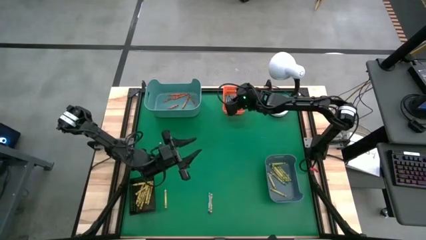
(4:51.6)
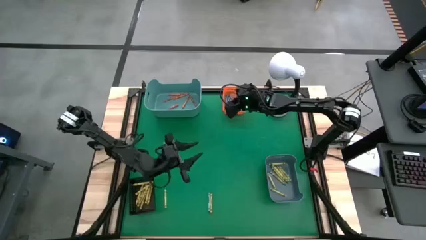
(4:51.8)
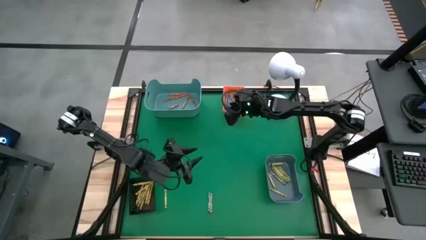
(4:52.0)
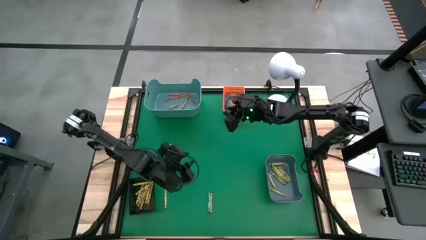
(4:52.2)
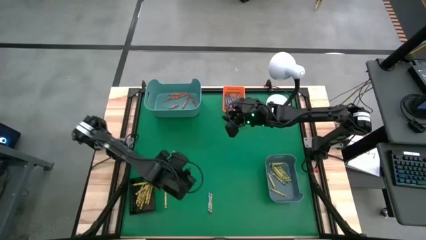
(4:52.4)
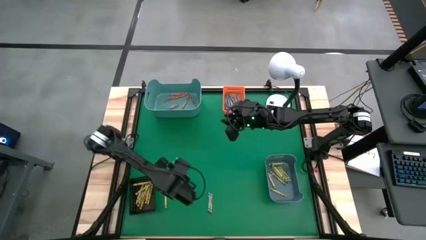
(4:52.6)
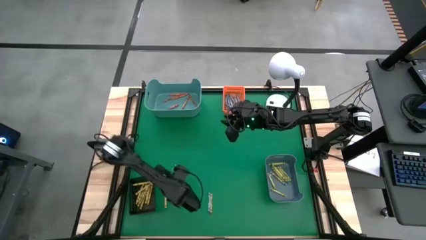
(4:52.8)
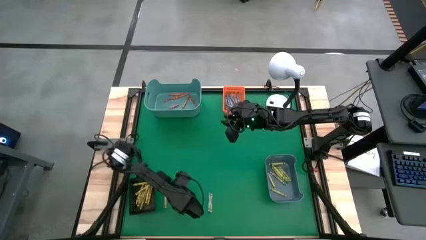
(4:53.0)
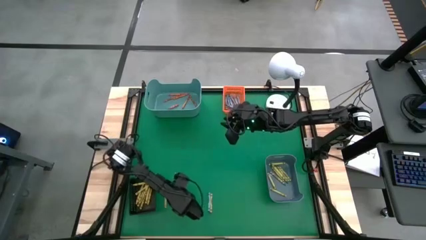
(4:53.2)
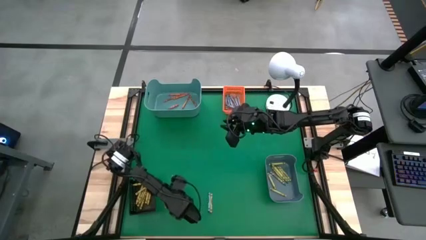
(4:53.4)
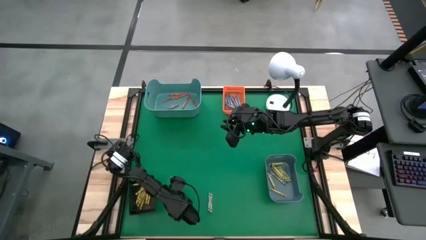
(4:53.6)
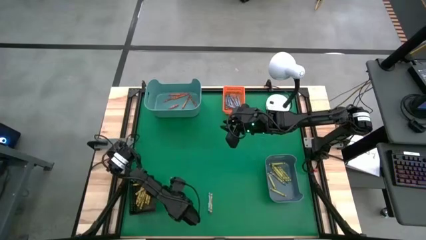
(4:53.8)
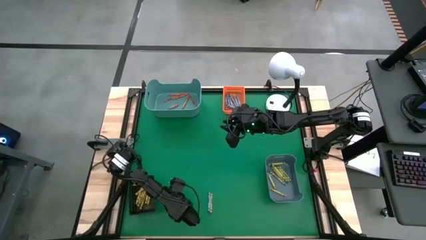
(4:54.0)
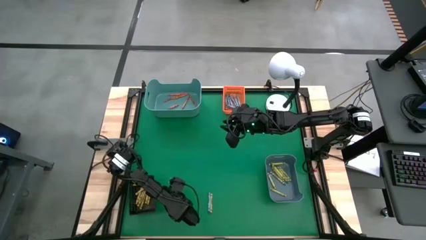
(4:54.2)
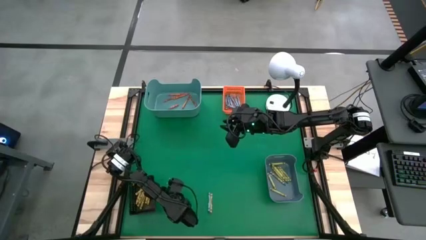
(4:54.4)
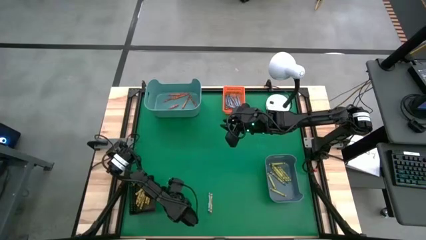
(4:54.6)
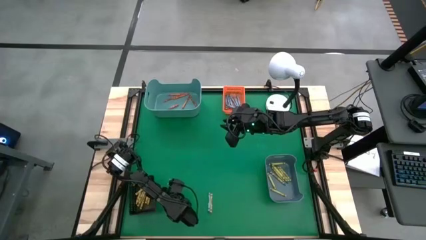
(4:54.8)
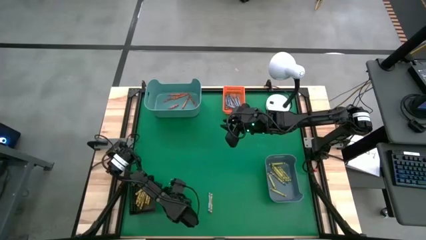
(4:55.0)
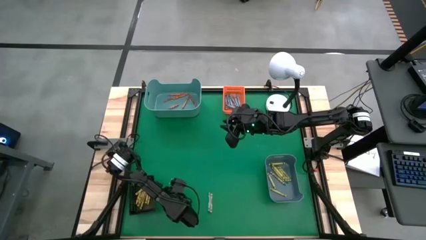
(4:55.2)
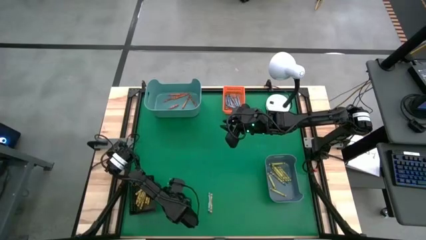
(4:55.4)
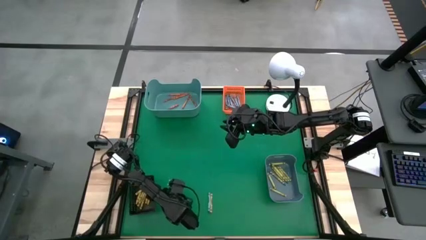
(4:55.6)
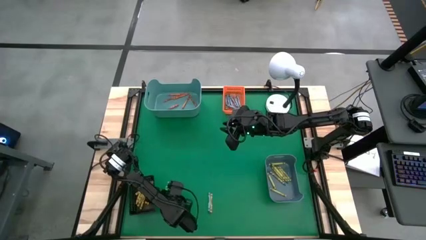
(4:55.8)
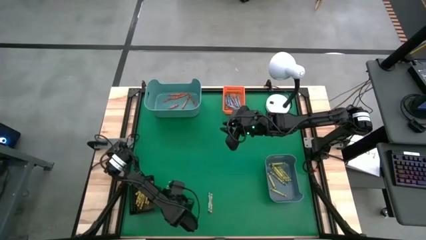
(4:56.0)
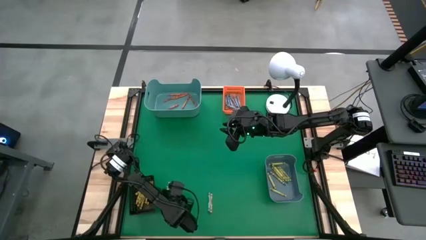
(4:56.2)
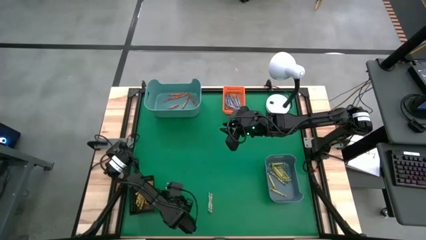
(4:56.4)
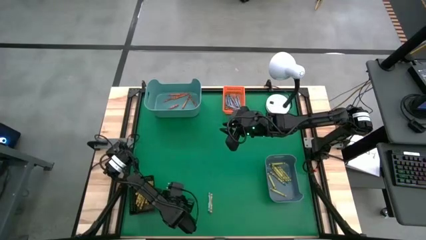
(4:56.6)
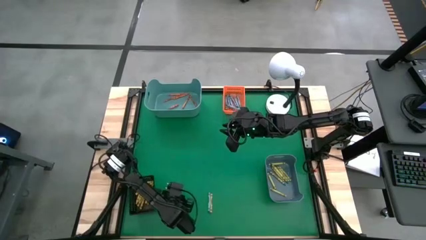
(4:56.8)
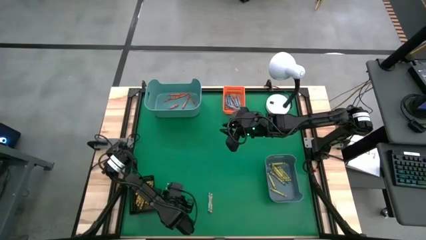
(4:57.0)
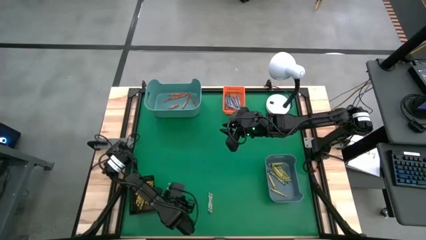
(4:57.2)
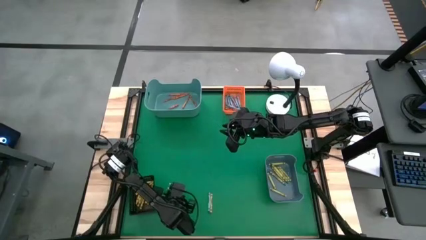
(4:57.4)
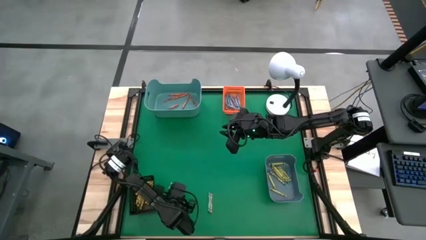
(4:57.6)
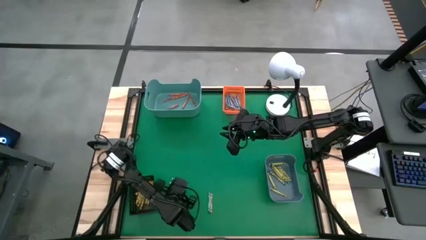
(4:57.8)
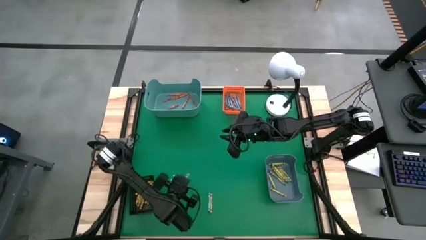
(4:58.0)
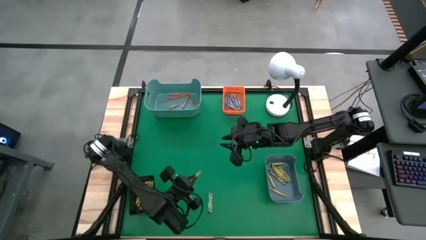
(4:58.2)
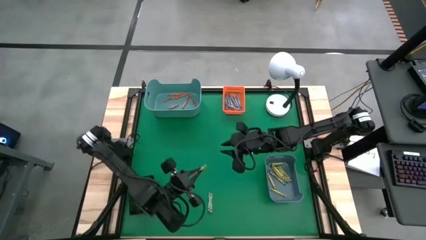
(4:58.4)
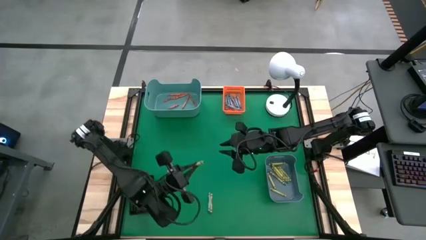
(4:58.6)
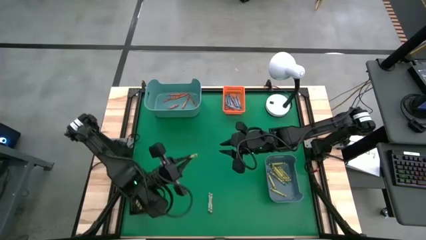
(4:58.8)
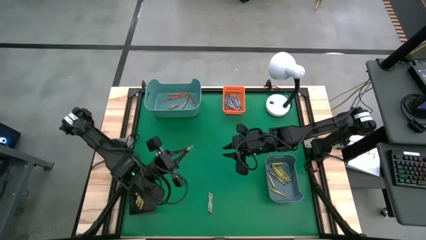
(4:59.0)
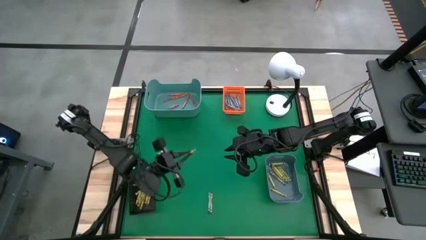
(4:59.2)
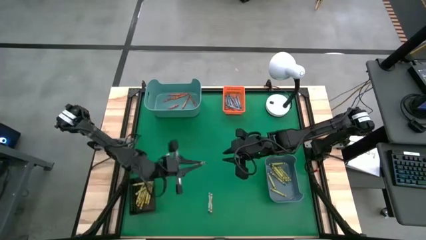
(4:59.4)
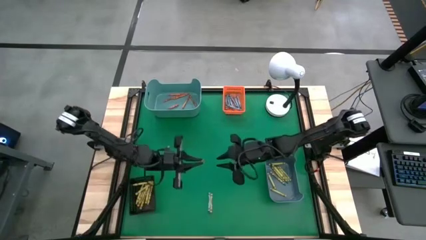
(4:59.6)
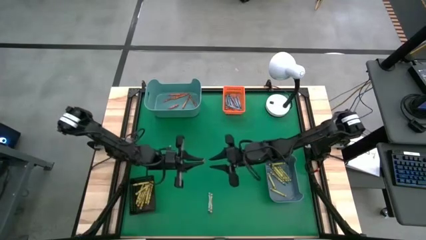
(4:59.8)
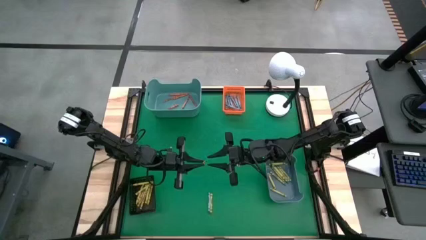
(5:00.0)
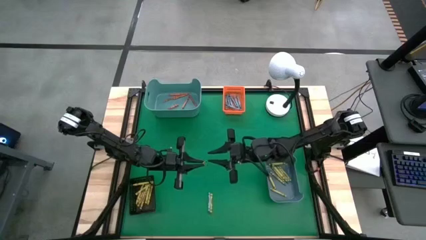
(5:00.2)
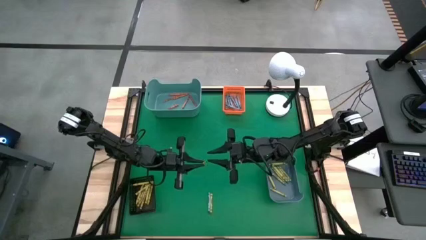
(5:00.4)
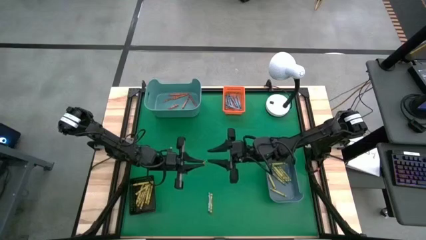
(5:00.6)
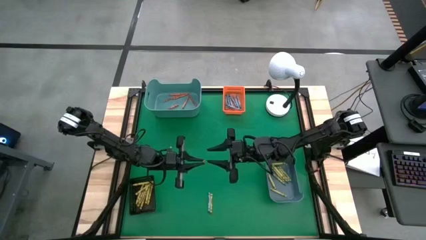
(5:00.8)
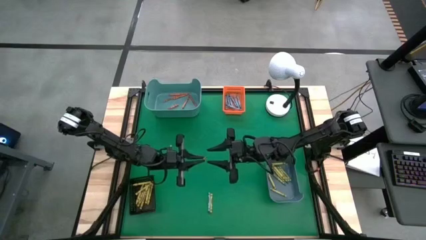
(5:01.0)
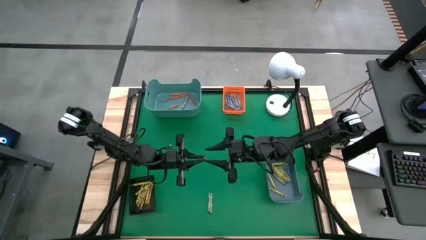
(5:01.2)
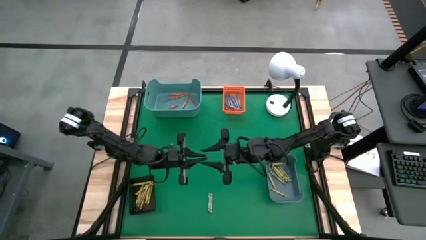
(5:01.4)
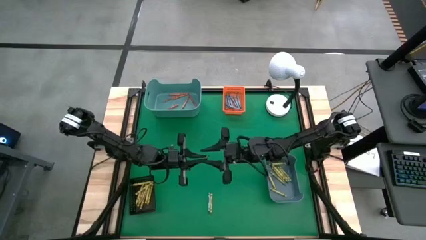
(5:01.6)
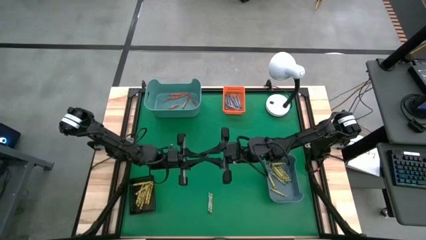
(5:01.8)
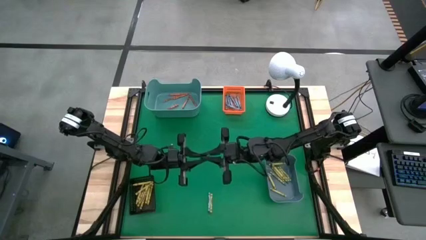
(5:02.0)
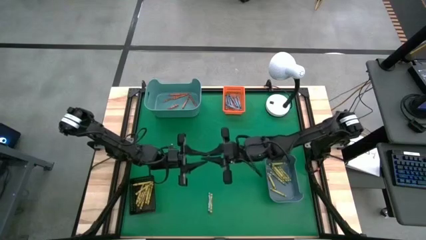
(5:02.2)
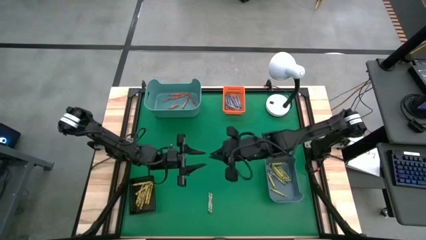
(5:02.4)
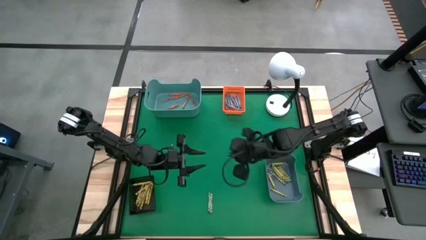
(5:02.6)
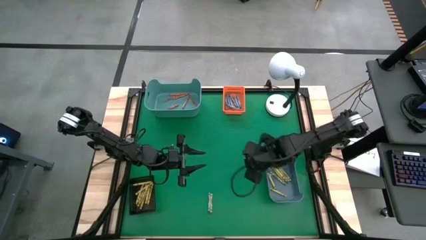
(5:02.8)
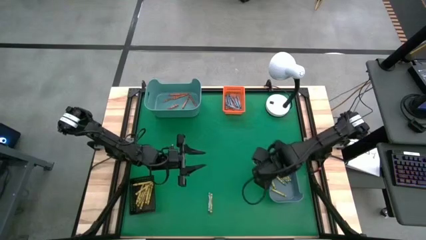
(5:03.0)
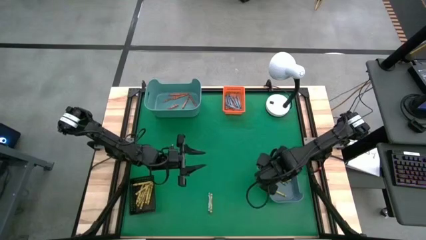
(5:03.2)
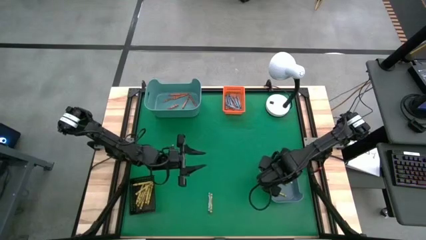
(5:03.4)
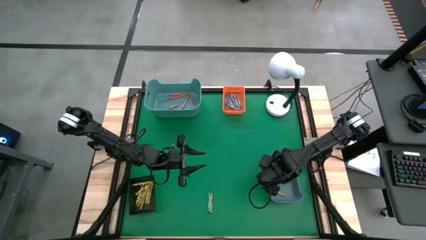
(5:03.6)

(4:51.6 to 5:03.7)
Task: Sort crayons
Put the green crayon into the blue bin
